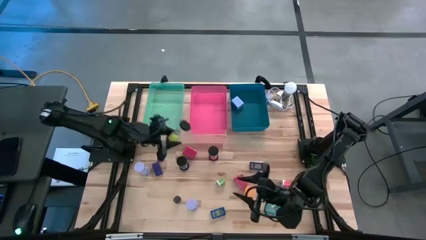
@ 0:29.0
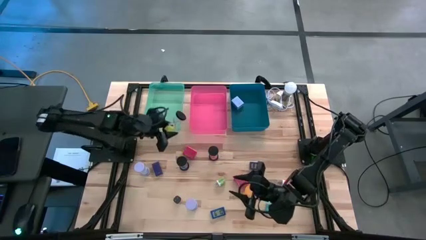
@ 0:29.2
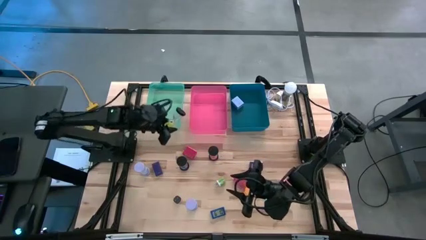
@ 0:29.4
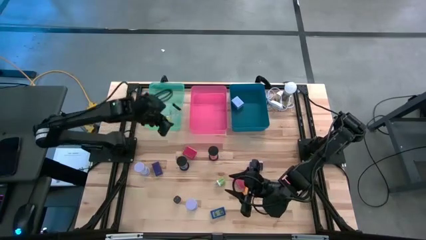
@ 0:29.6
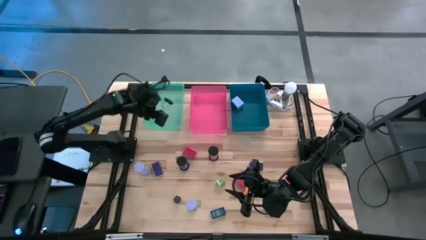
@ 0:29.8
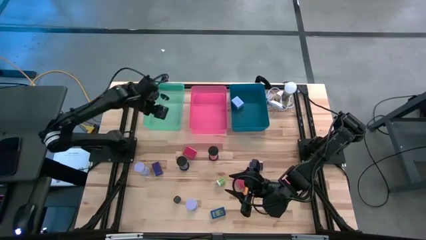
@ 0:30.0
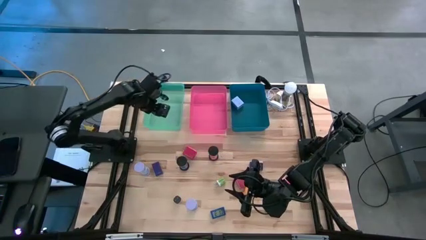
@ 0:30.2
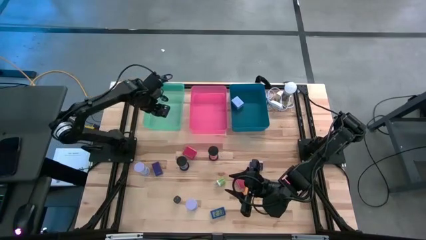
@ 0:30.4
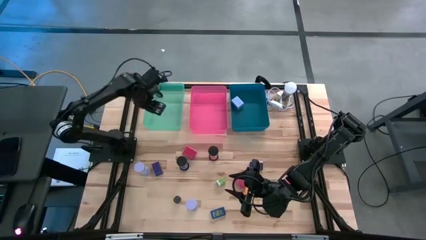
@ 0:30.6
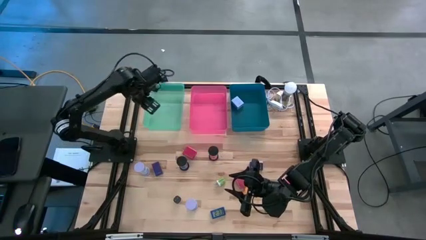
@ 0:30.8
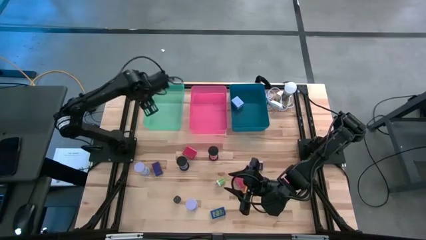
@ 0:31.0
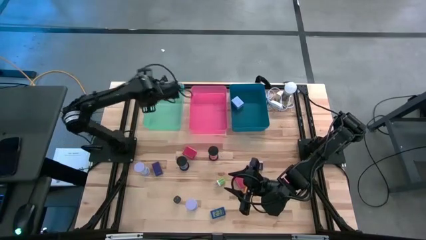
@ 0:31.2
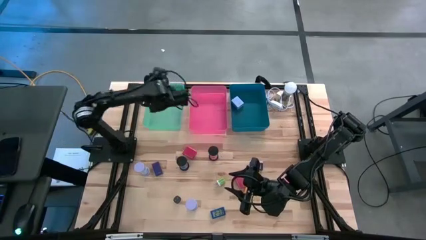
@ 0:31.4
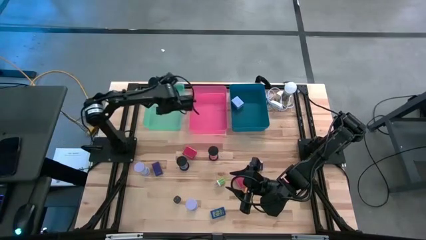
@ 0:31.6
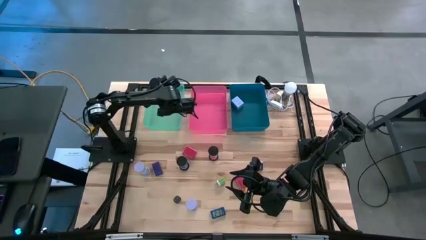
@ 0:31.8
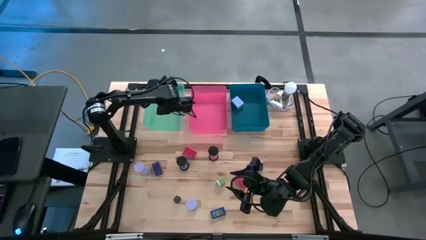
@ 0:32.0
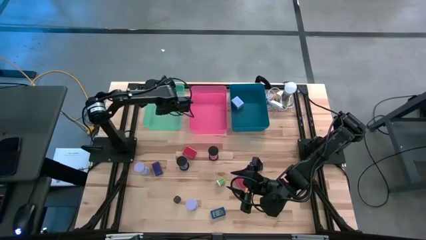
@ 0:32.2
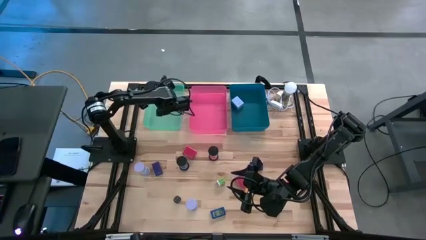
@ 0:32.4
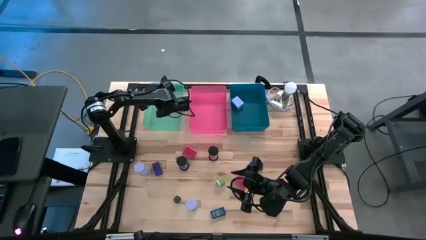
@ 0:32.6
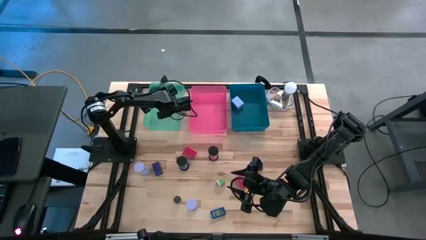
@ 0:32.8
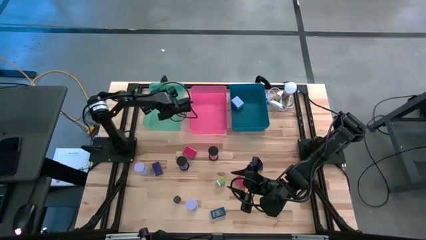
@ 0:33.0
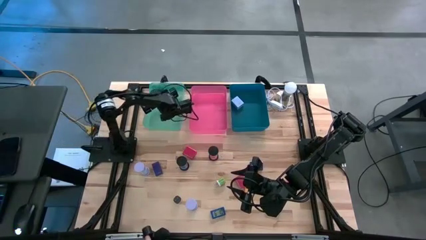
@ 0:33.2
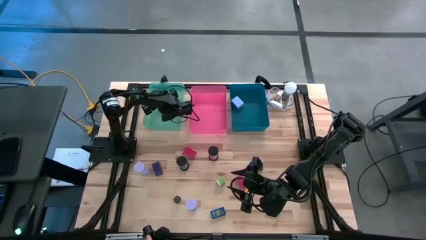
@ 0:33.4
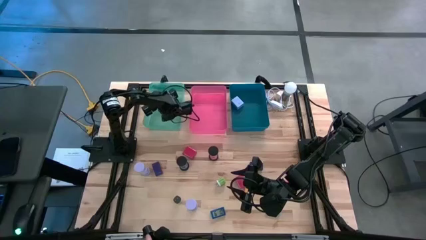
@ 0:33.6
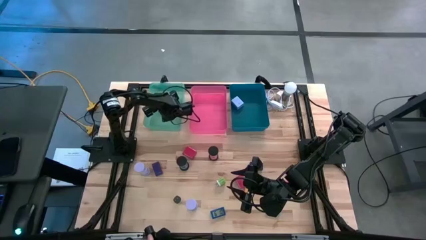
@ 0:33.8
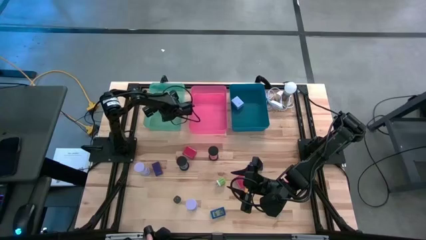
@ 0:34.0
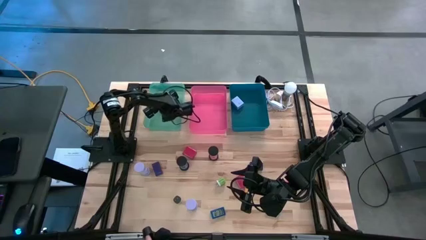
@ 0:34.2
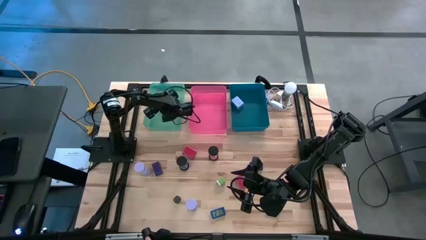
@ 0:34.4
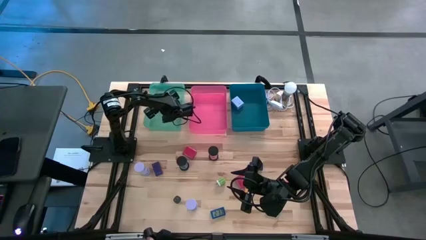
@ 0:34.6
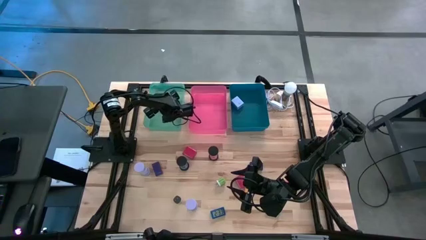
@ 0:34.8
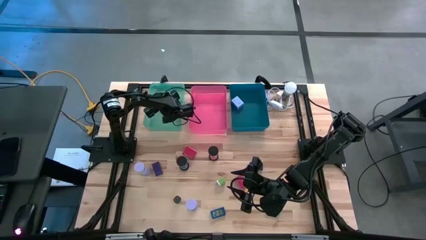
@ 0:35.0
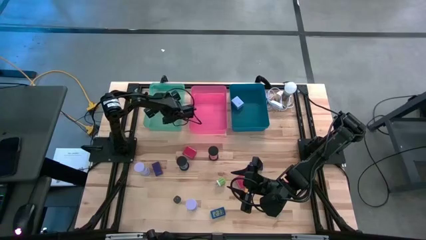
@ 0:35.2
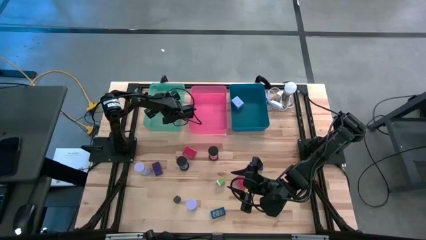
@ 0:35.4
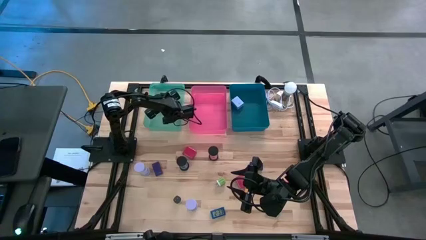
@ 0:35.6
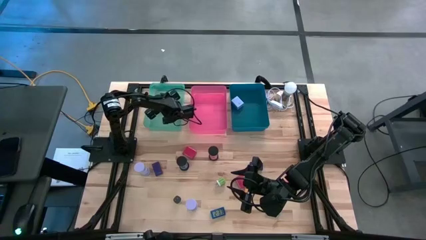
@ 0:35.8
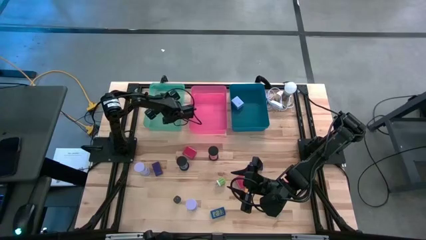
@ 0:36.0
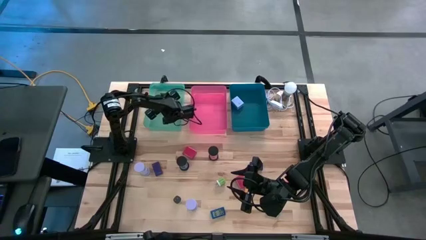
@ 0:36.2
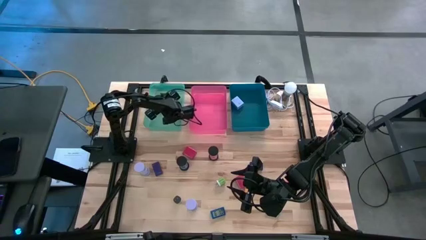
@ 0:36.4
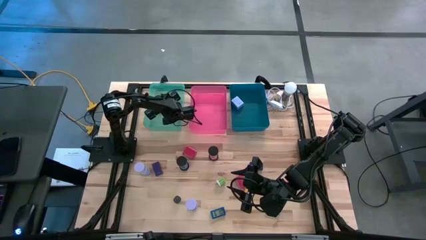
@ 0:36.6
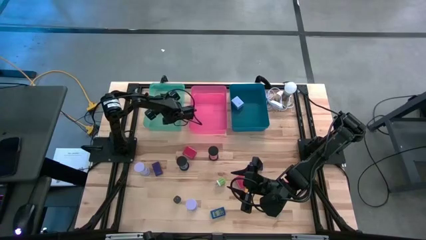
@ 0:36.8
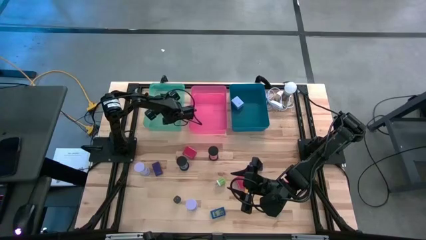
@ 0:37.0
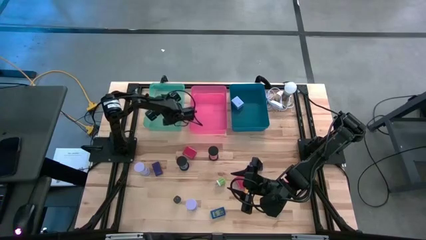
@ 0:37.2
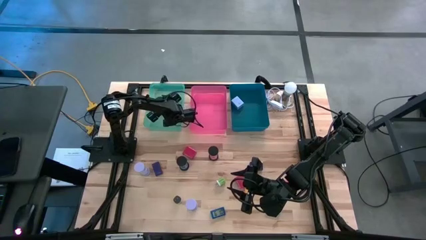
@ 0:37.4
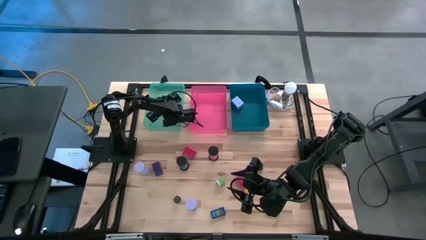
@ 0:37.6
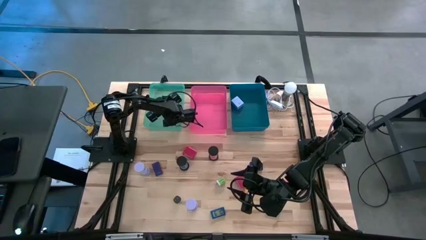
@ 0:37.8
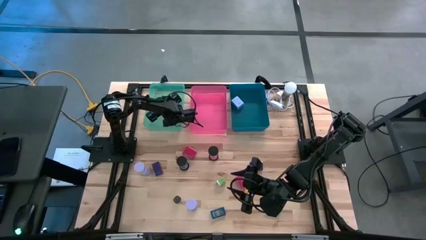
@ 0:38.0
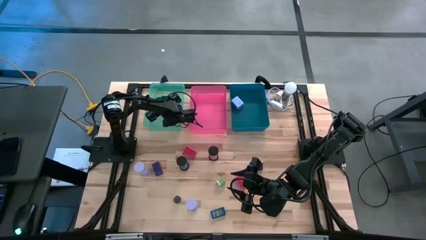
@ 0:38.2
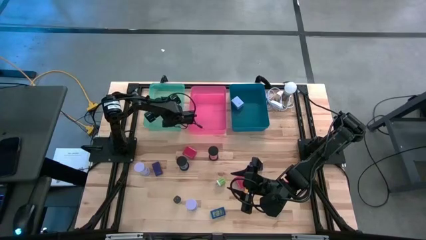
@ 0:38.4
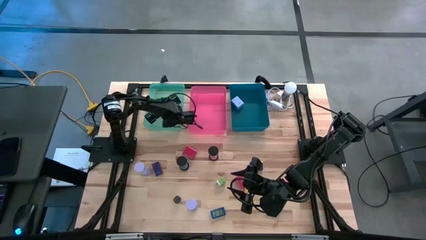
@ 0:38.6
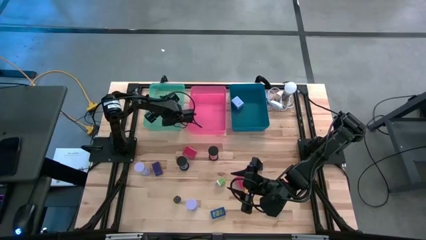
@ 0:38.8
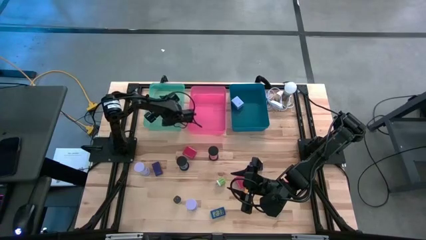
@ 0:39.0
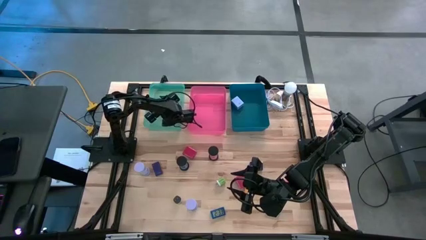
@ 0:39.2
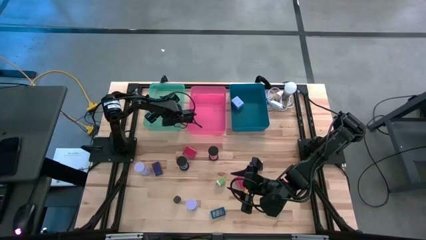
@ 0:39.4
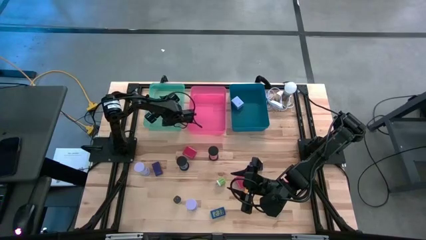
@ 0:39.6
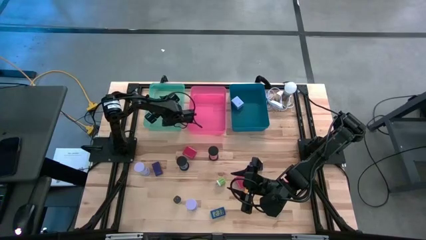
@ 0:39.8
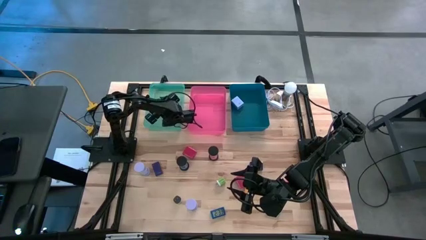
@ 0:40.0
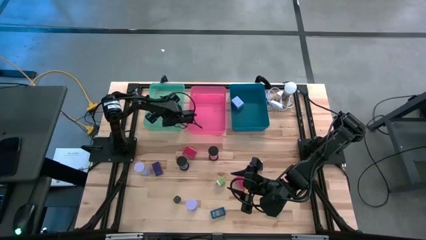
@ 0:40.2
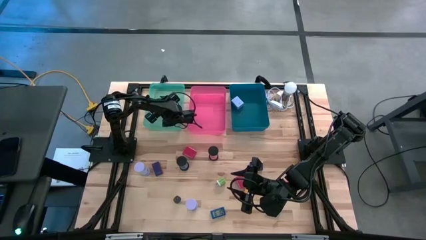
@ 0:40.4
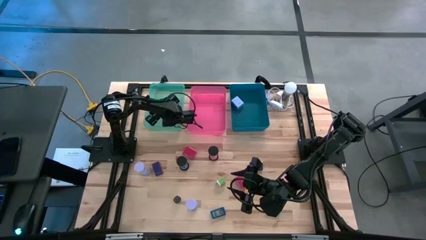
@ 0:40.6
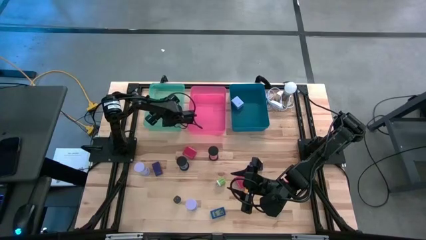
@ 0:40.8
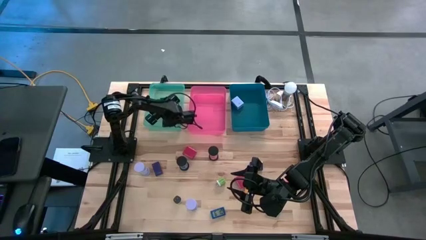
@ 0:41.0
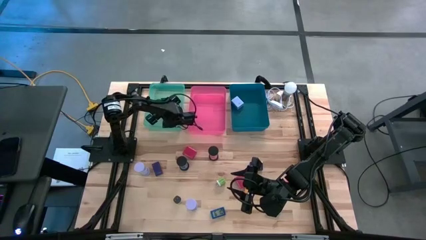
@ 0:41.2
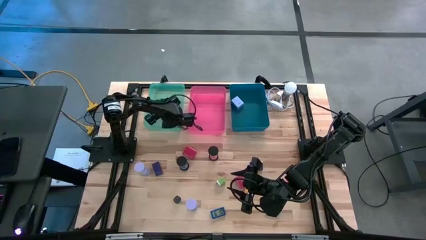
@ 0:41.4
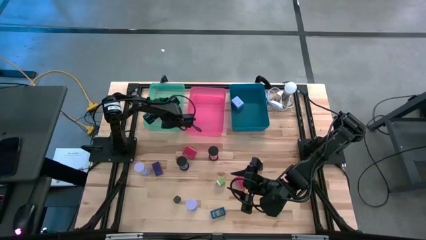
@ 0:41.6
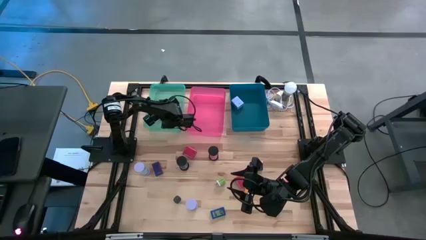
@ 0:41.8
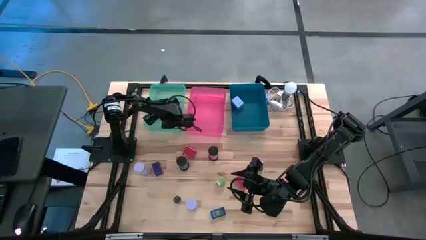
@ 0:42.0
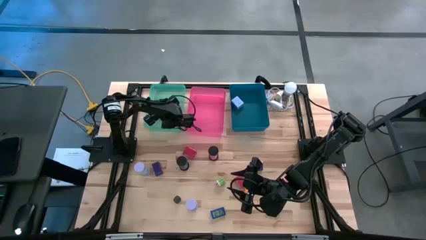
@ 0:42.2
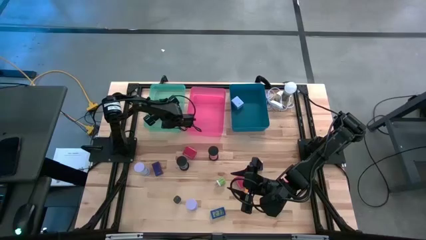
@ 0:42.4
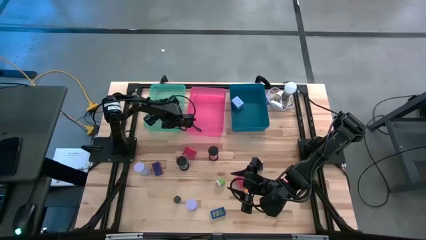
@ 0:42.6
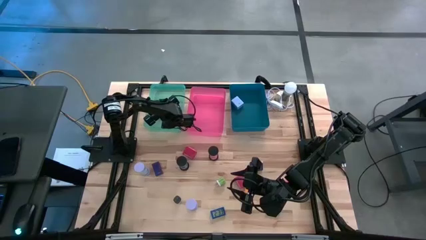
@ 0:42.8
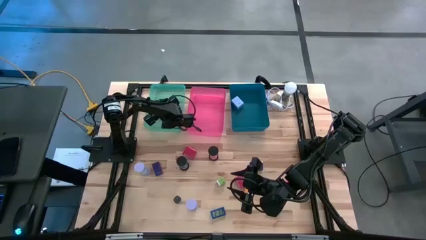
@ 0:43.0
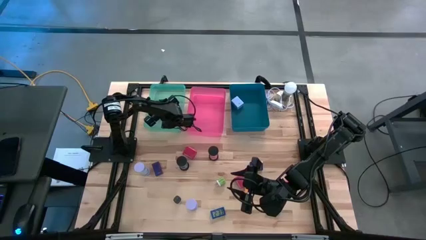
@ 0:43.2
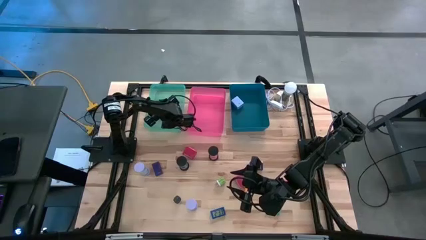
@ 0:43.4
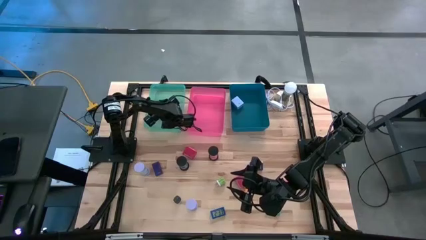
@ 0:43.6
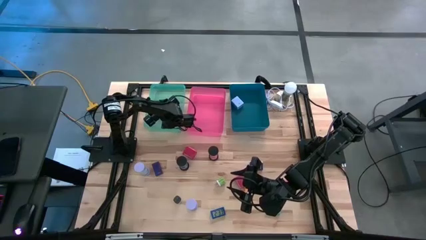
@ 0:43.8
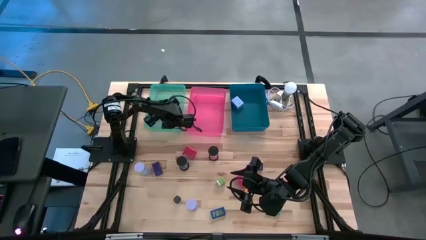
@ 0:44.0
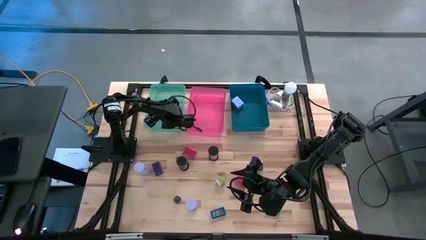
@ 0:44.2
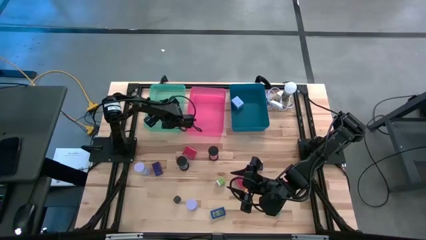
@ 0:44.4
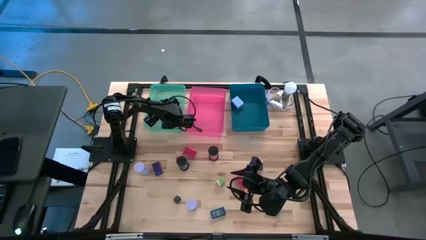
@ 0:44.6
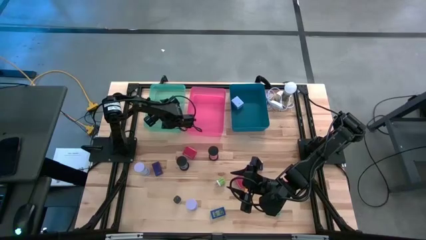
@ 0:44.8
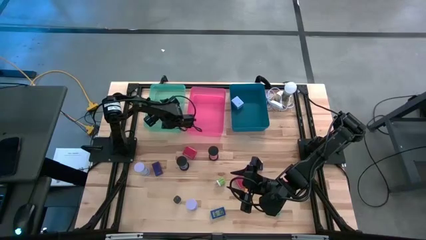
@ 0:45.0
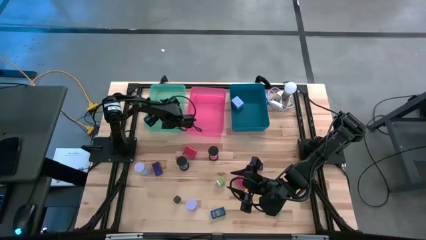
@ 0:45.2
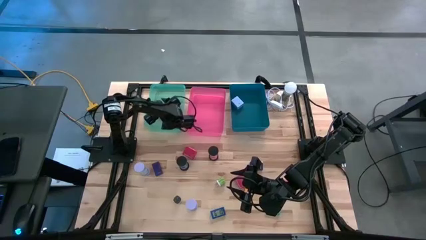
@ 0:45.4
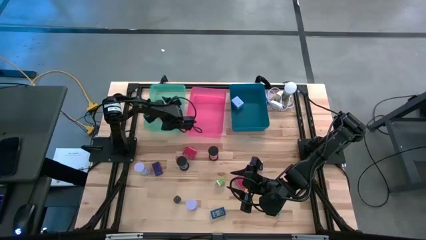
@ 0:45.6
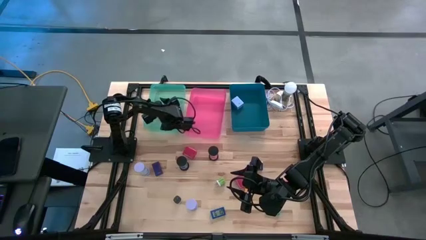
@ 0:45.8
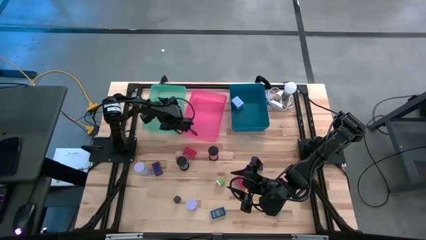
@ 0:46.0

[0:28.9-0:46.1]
Task: Pick & Place Office items
Put the green hourglass into the green bin
